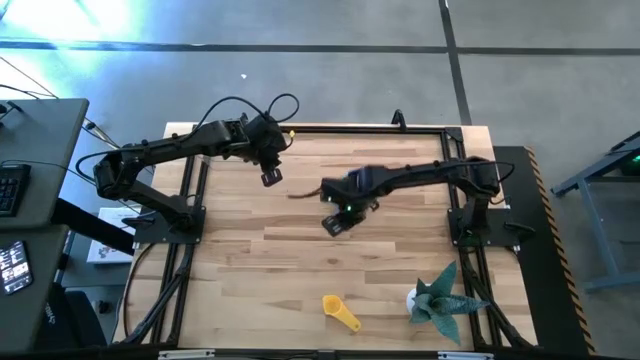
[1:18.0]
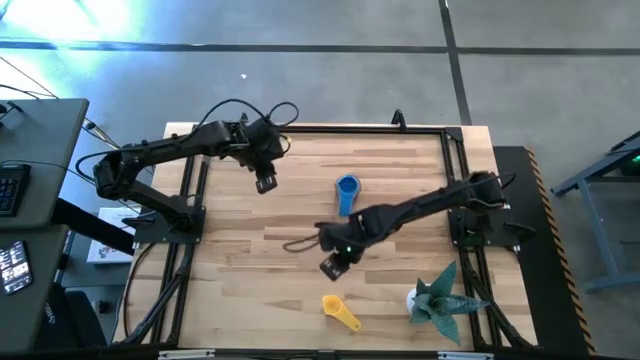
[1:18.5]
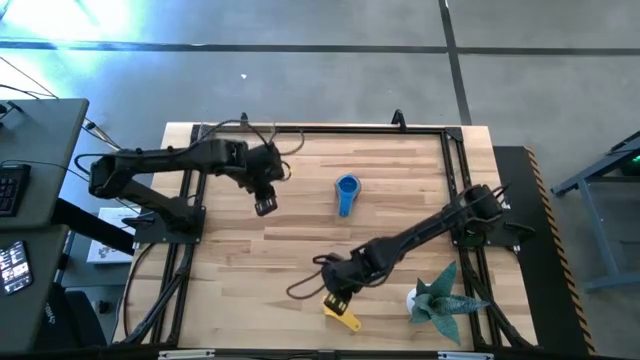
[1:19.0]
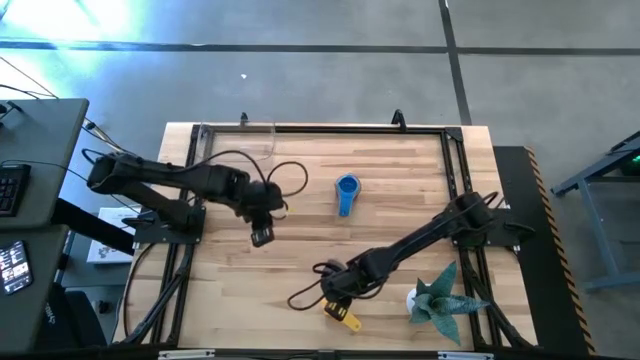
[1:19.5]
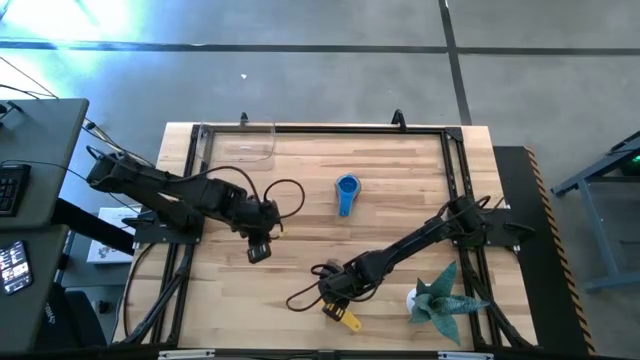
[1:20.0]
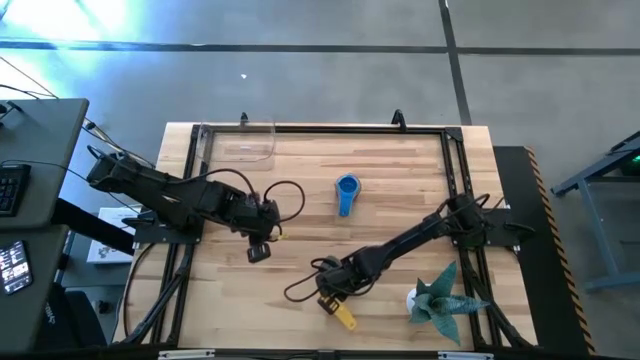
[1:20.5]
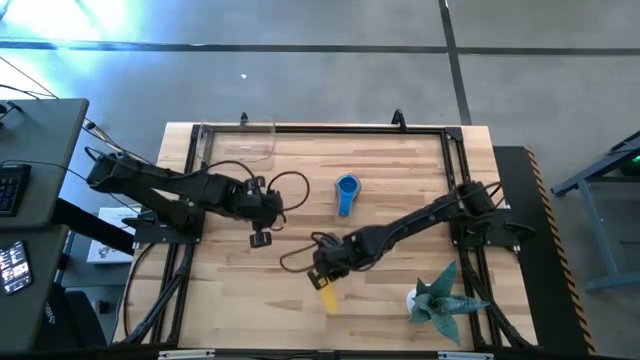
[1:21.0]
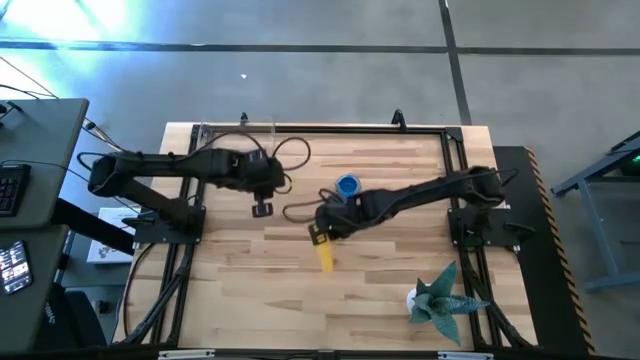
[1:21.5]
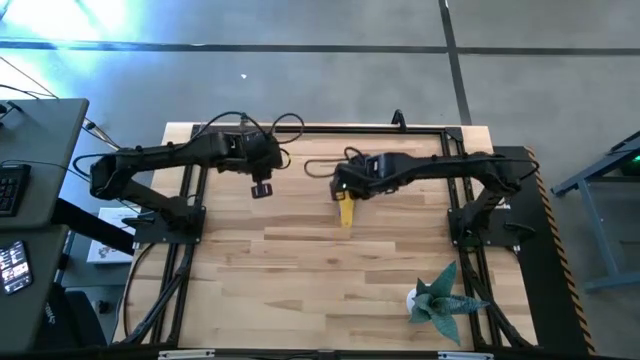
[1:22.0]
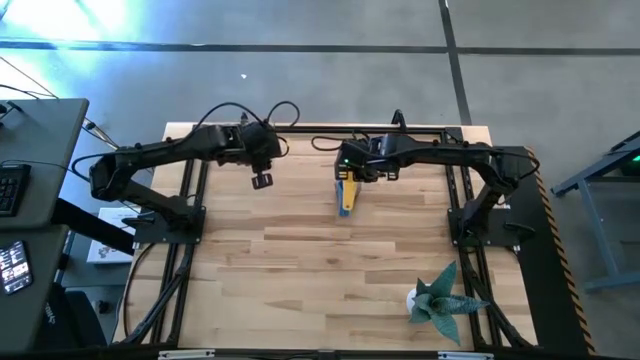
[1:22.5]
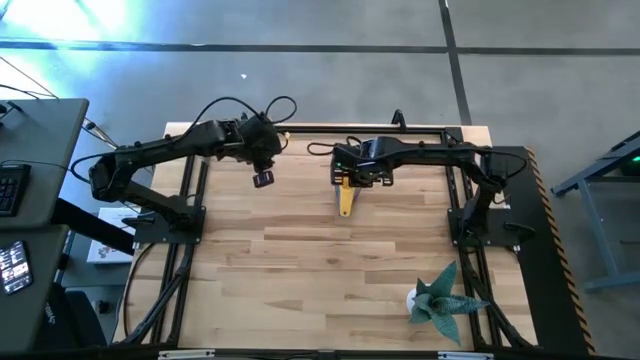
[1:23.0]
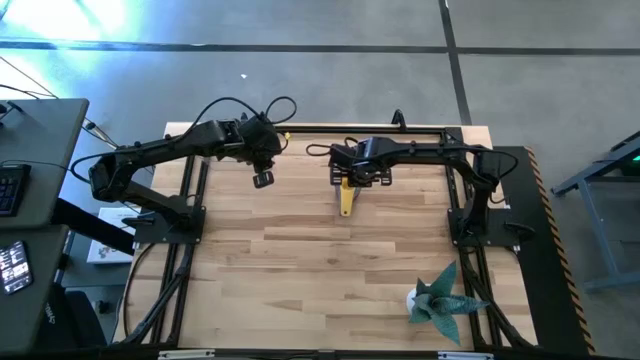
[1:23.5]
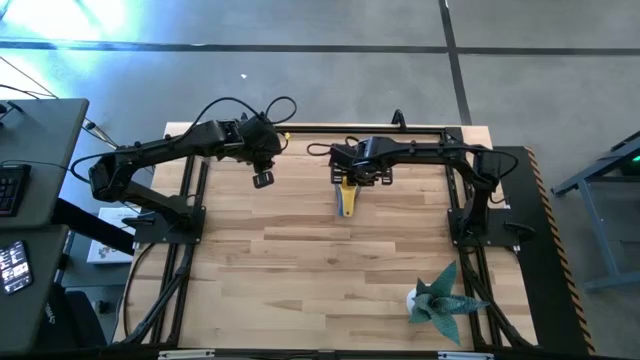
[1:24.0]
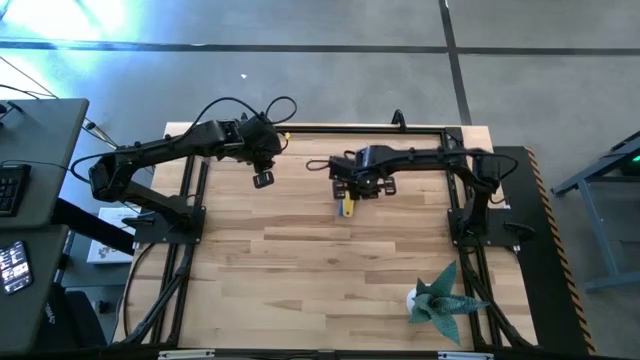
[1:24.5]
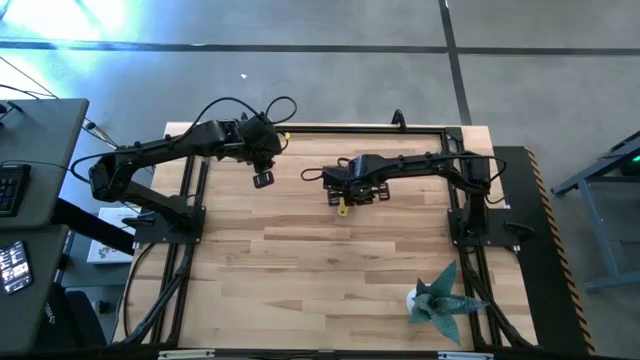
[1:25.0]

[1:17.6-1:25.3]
Task: Nest measuring cups in basket
Stack the yellow measuring cup on top of the blue measuring cup on the table

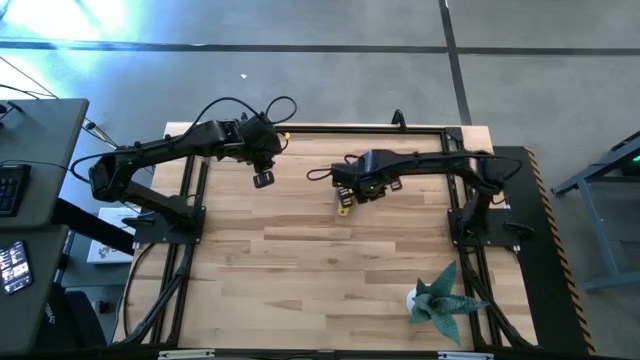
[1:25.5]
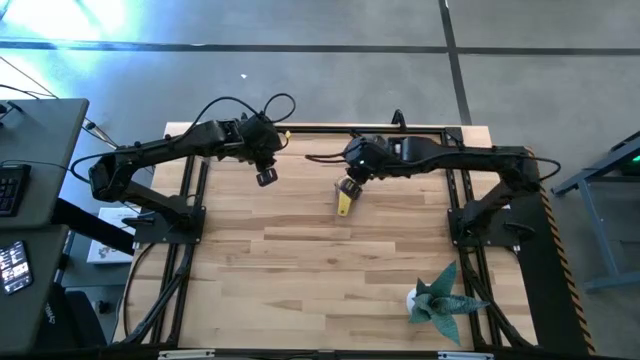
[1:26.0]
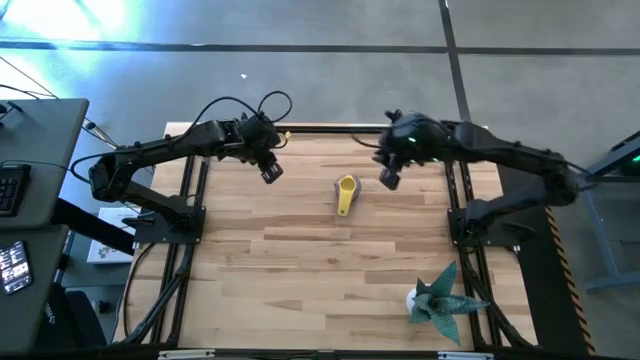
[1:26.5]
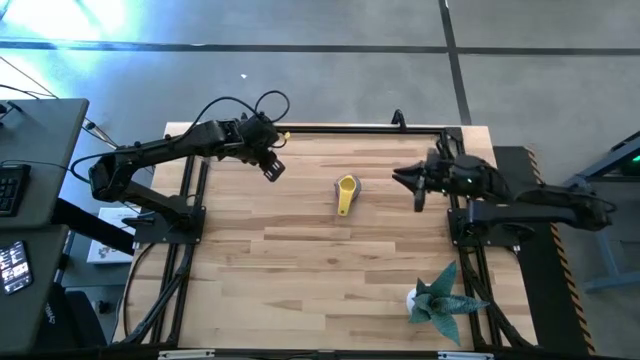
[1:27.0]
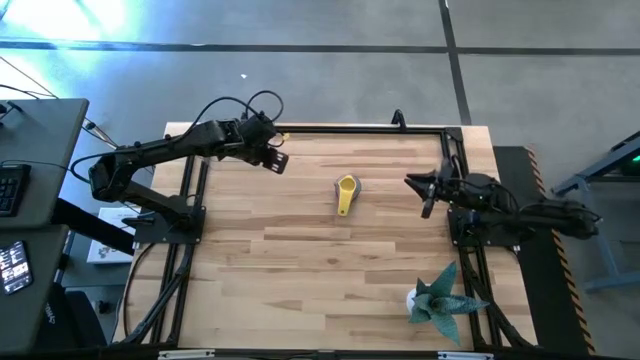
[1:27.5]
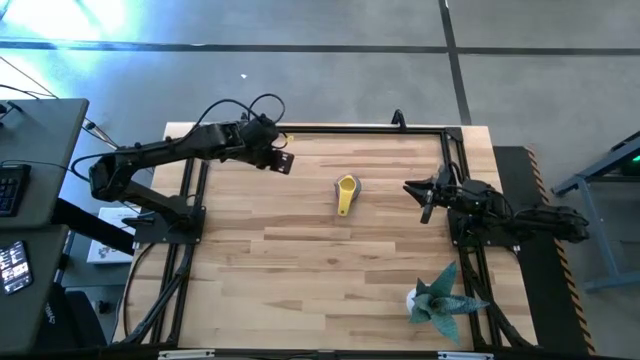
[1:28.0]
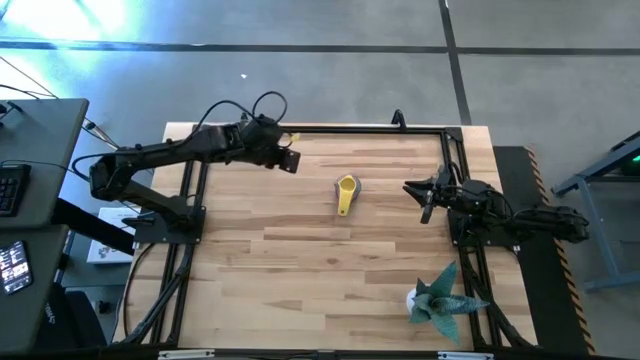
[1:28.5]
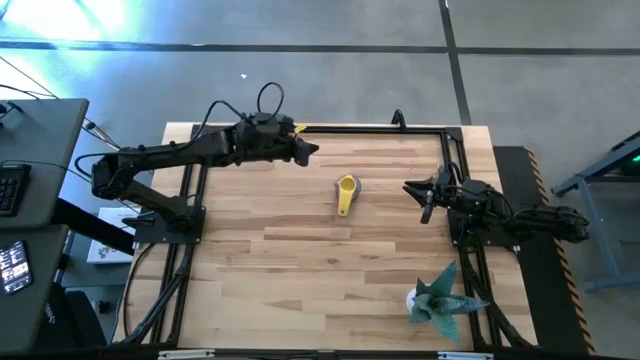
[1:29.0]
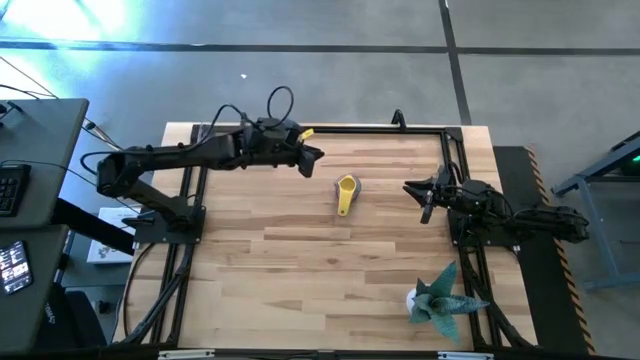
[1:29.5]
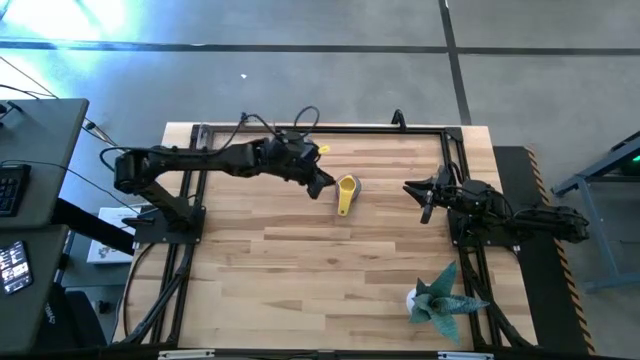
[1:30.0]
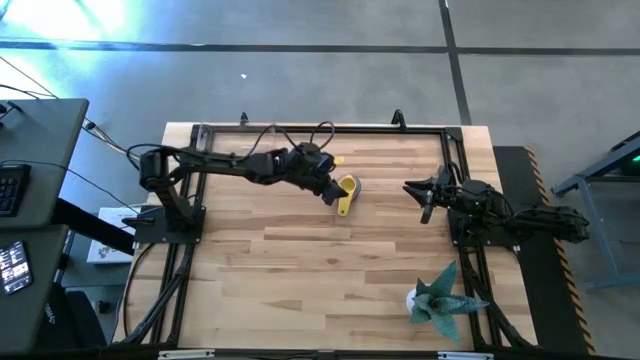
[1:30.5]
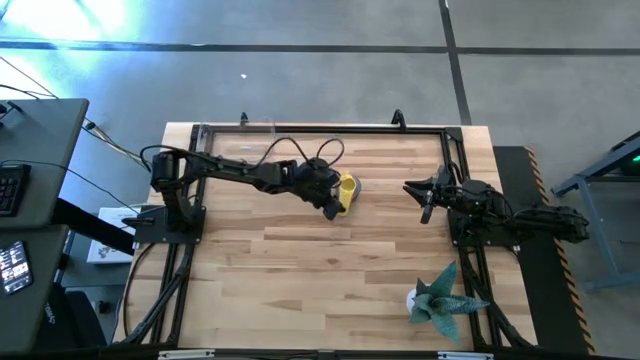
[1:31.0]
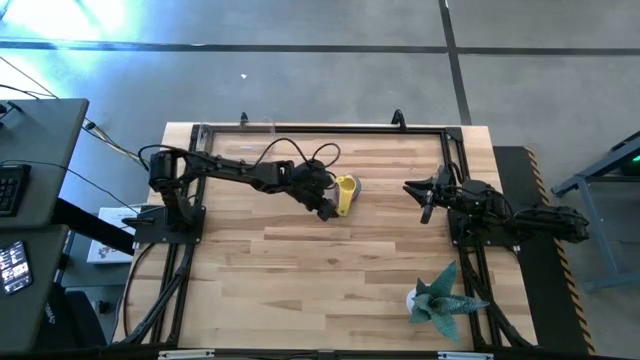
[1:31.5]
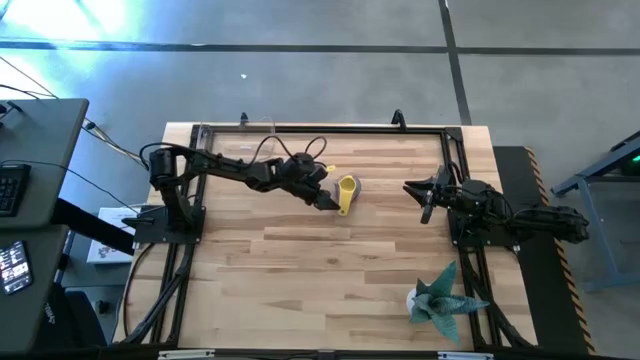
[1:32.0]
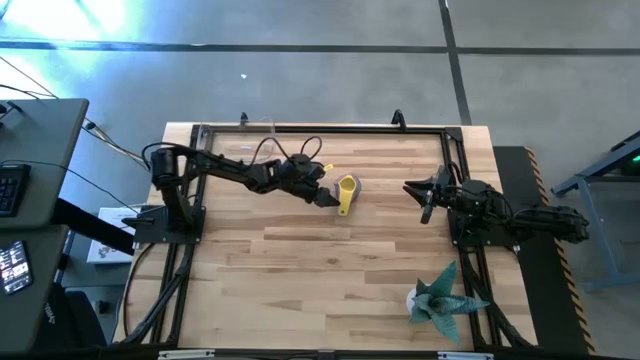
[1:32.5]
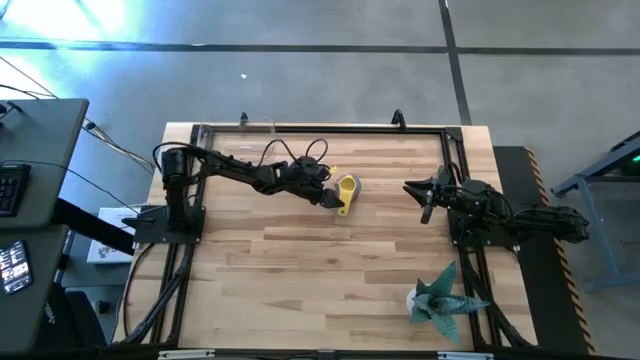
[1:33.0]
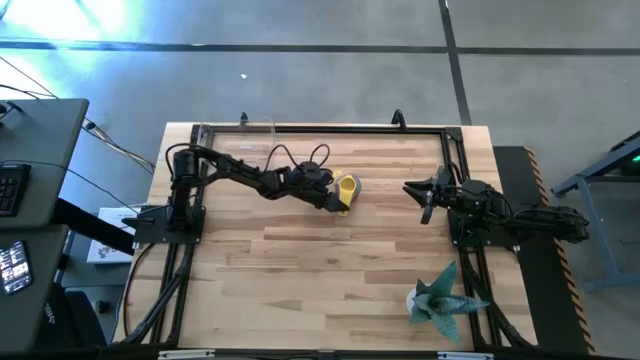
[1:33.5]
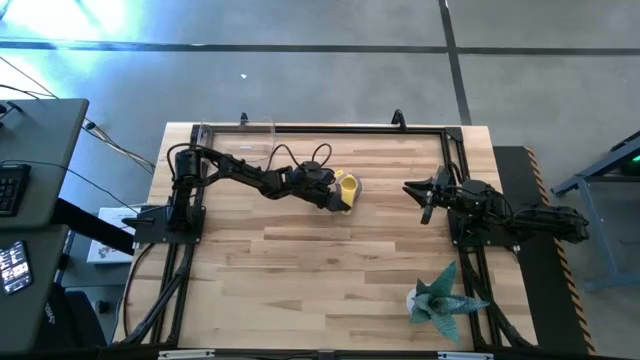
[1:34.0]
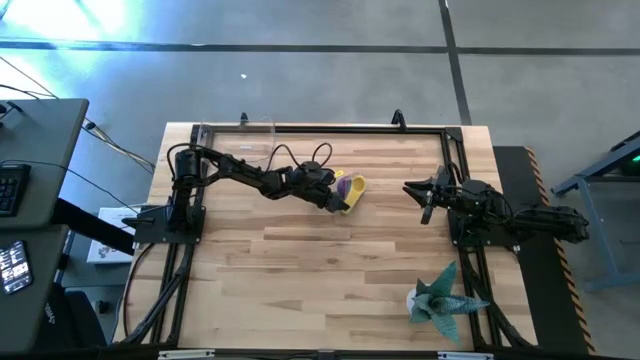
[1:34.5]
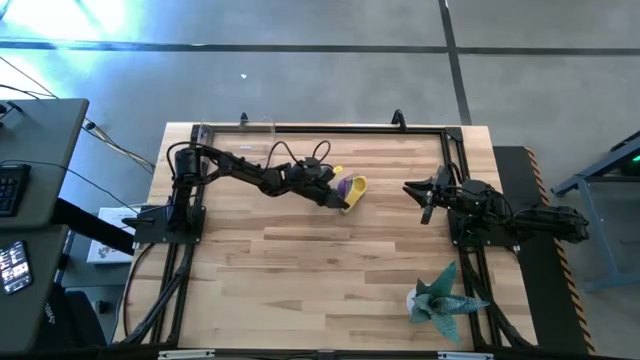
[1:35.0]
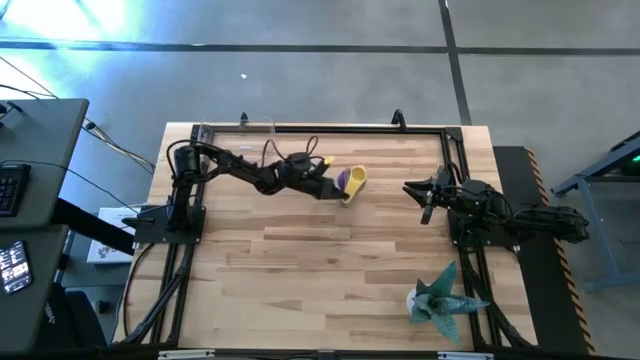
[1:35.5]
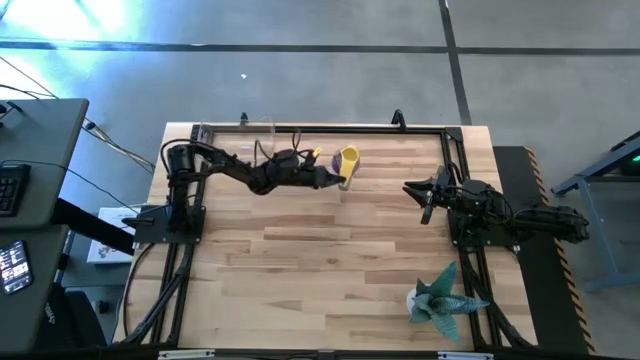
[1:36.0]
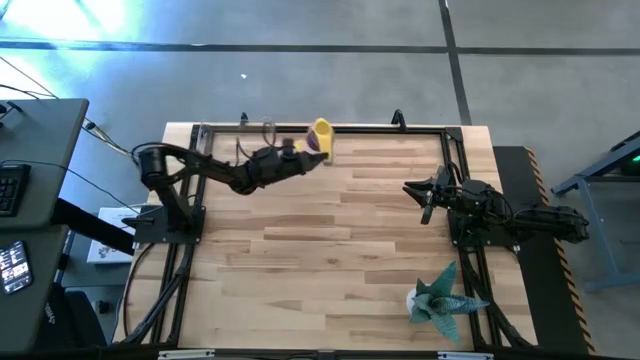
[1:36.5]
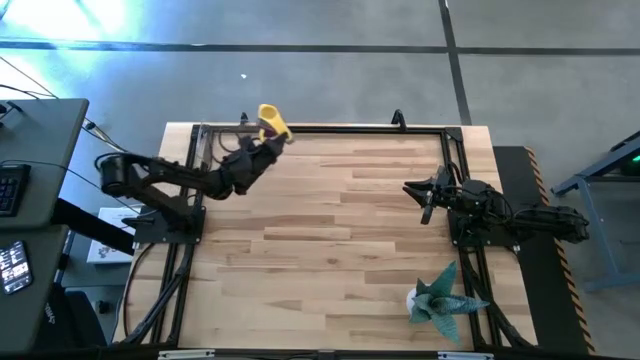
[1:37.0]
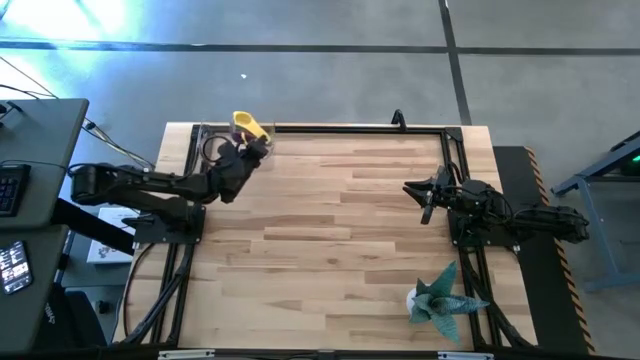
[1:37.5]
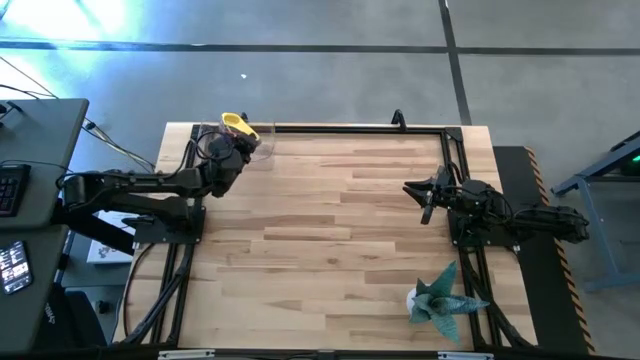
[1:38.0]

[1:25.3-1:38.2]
Put the stacked, colored measuring cups into the transparent bin
